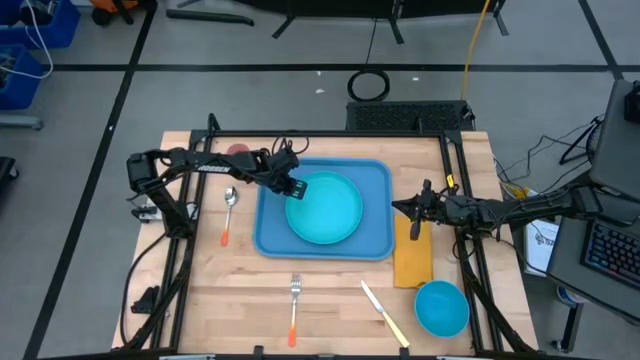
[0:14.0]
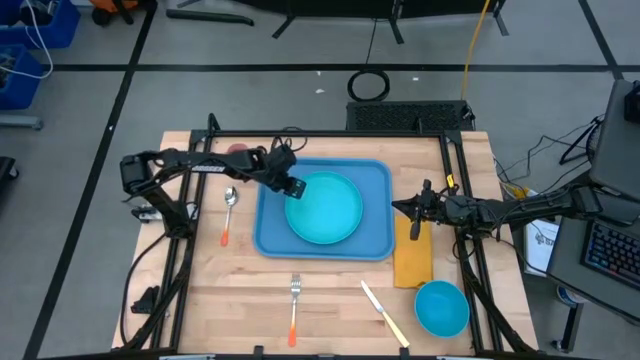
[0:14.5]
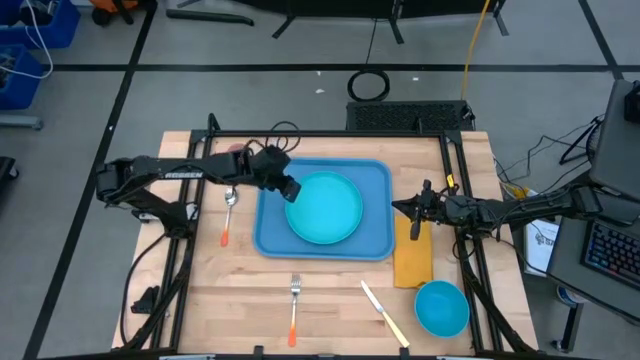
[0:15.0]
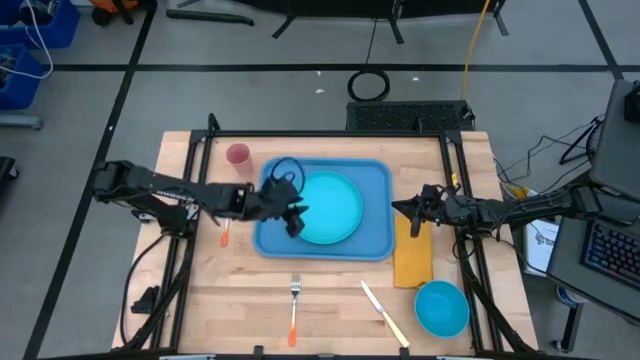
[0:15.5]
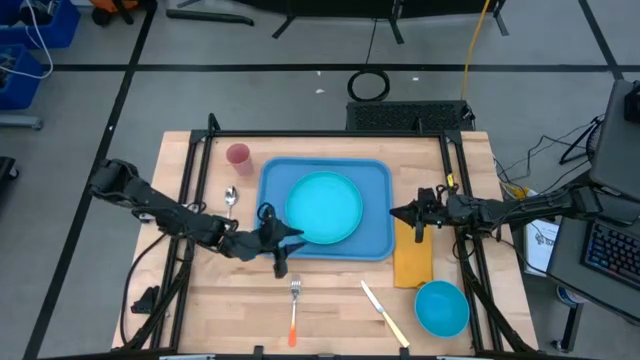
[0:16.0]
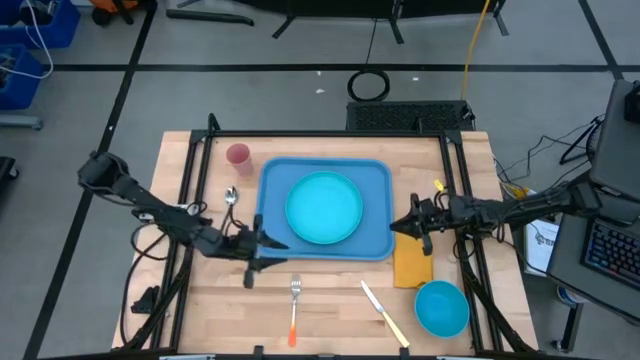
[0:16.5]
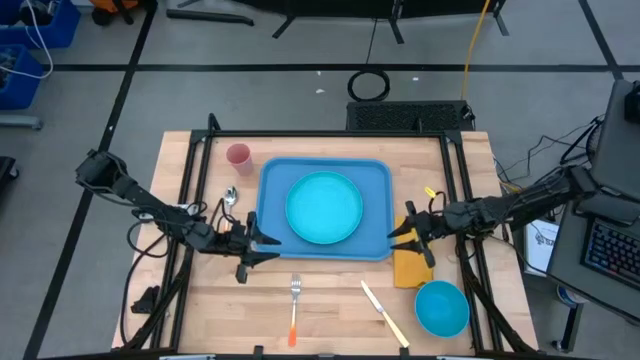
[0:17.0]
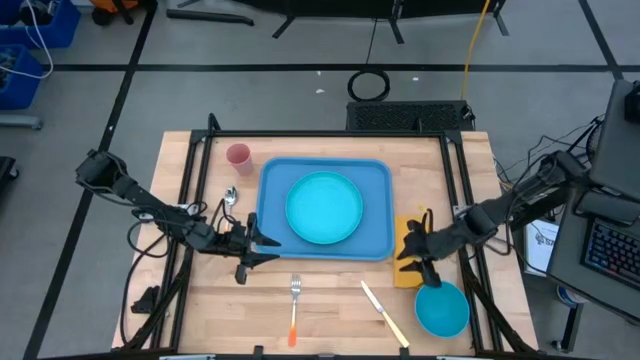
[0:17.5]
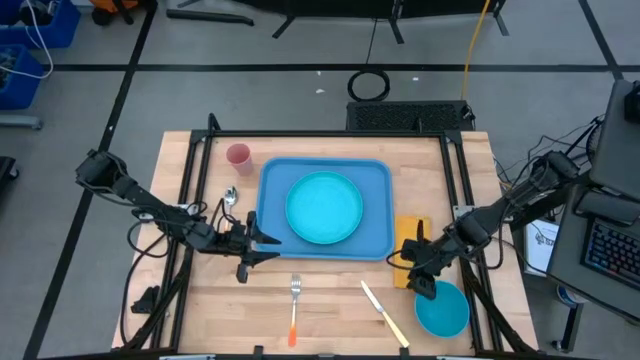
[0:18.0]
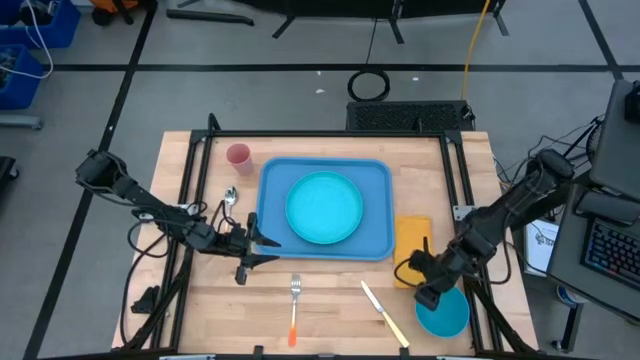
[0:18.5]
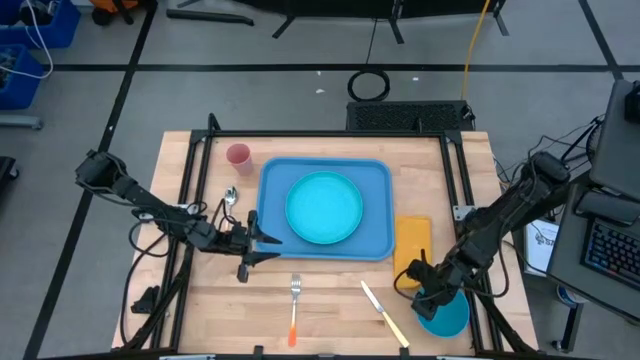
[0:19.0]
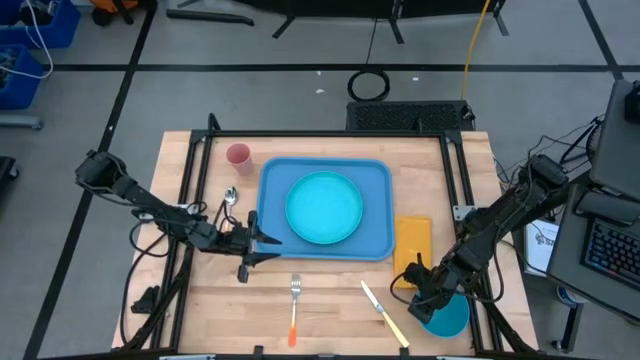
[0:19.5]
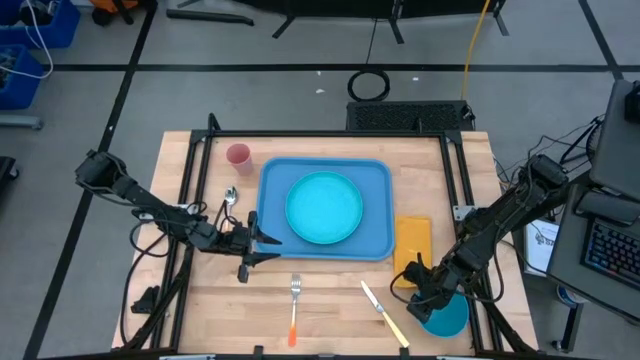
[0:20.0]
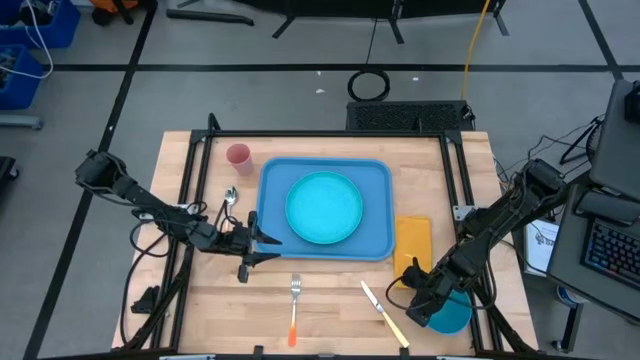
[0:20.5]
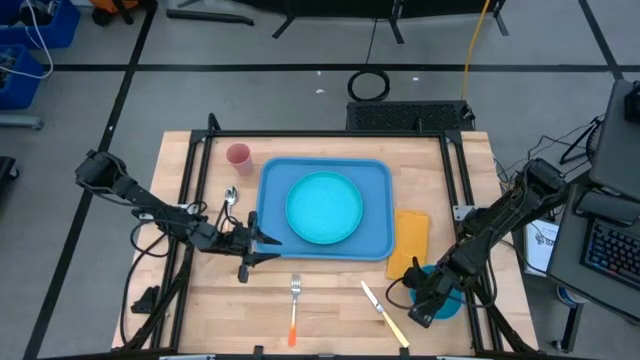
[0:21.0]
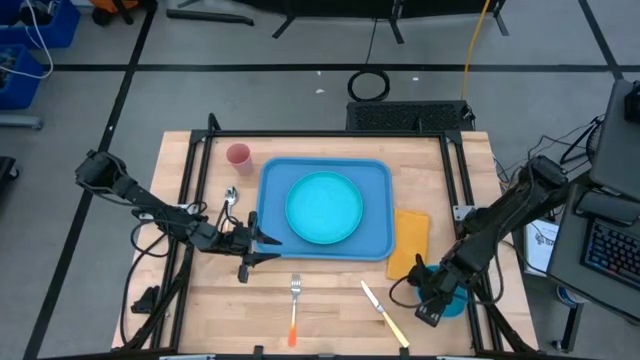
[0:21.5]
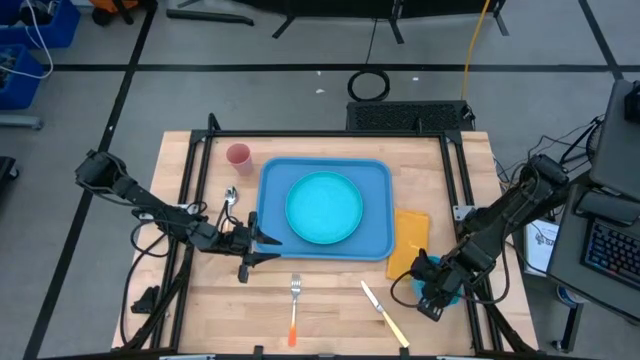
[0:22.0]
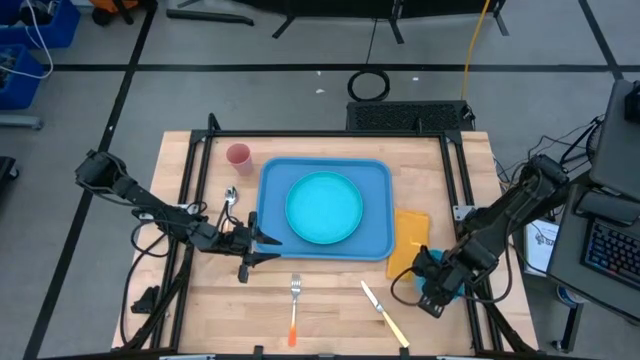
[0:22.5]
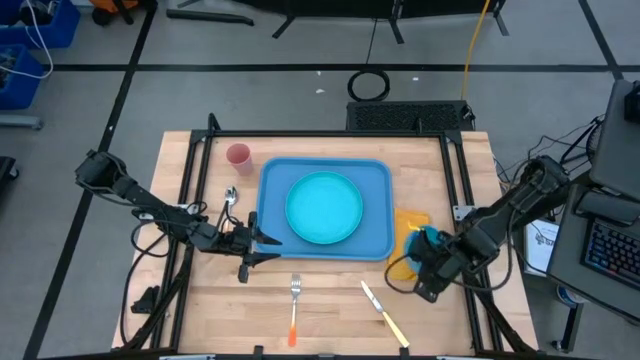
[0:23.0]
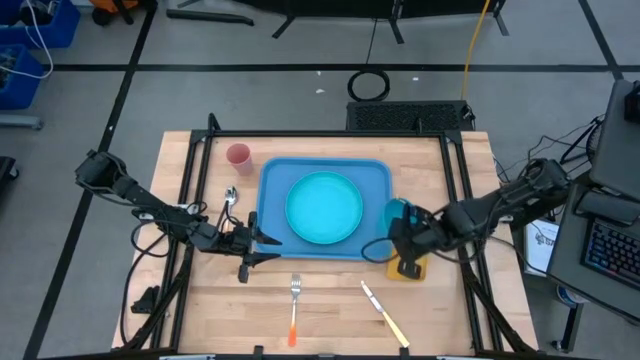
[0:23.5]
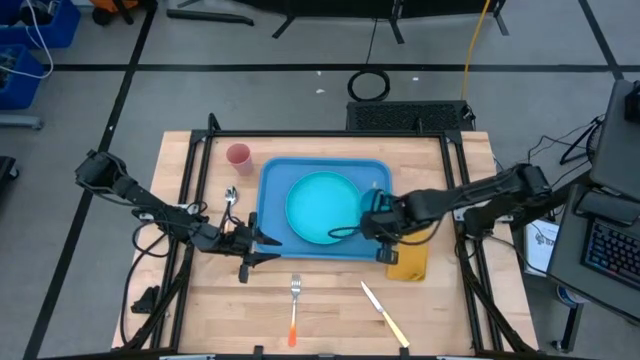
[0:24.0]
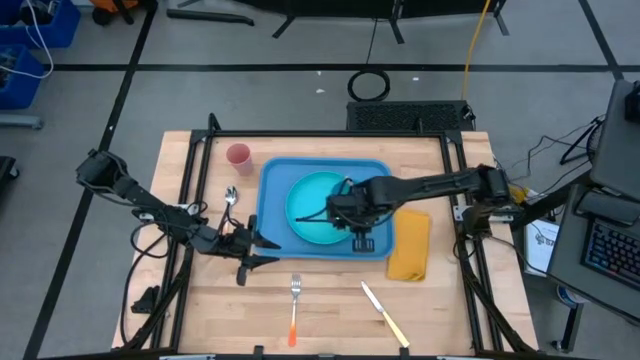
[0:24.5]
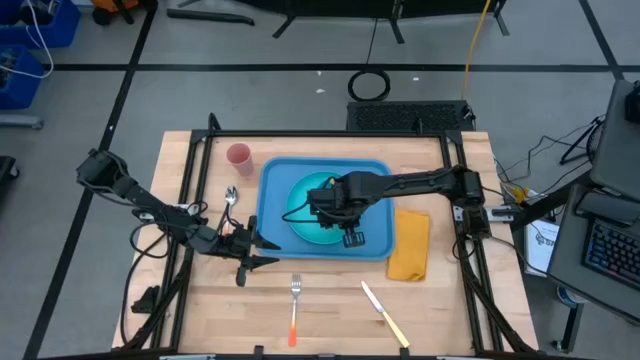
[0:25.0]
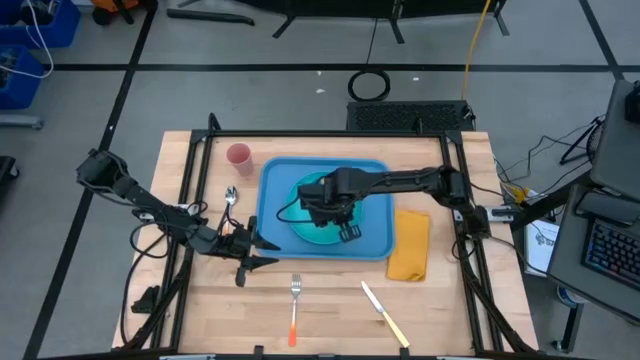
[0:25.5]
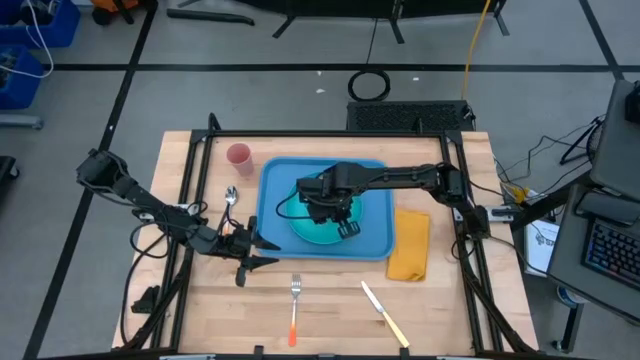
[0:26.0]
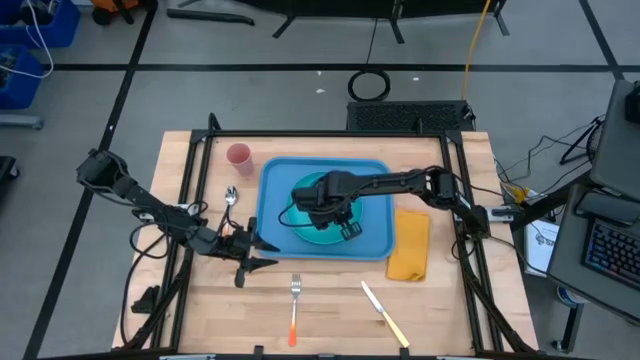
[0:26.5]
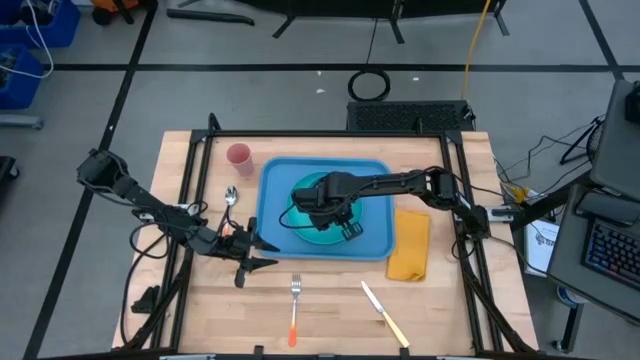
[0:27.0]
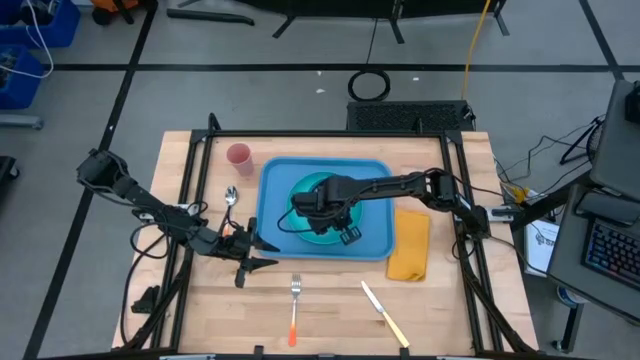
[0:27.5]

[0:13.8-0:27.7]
Task: Set up tray
Put the blue bowl on top of the plate on the blue serving tray

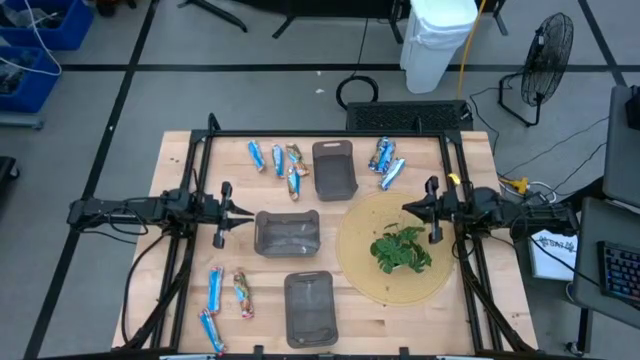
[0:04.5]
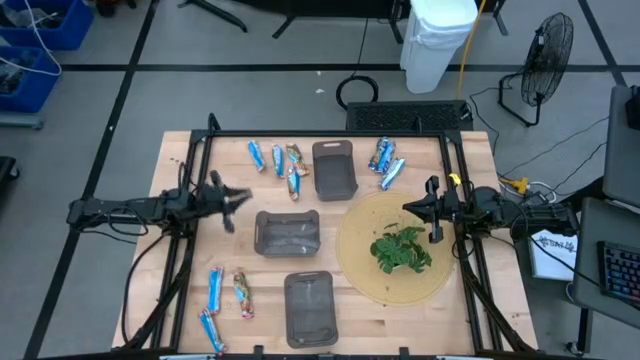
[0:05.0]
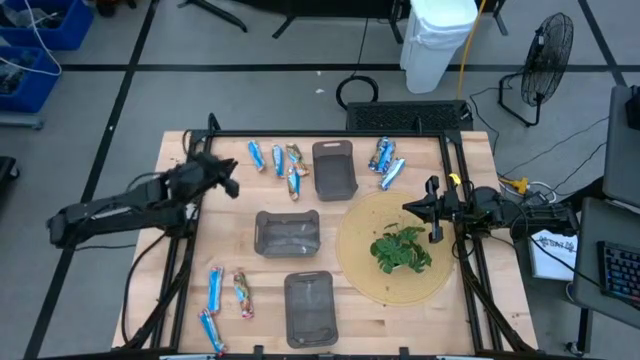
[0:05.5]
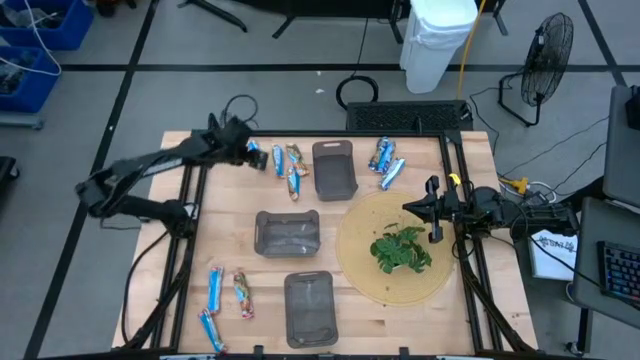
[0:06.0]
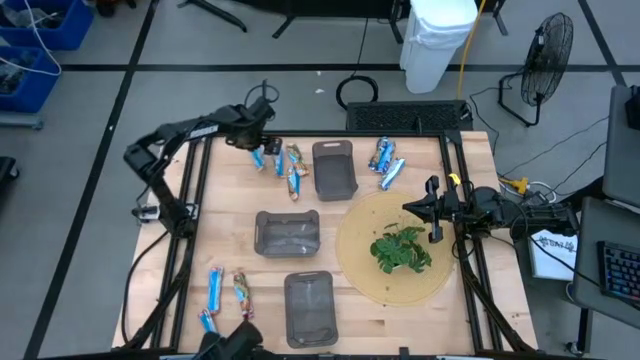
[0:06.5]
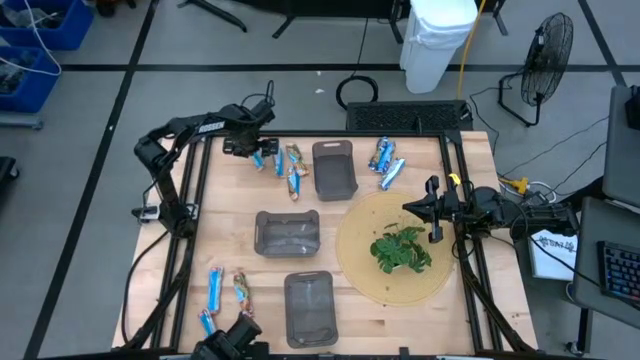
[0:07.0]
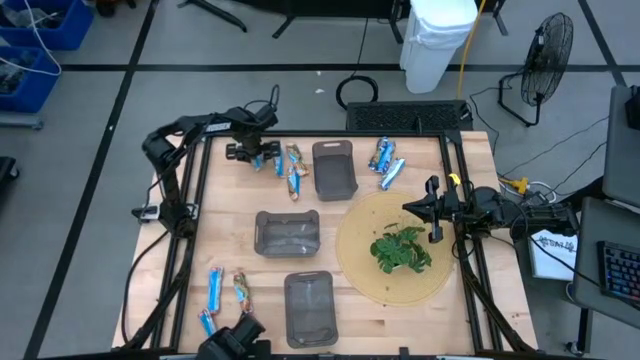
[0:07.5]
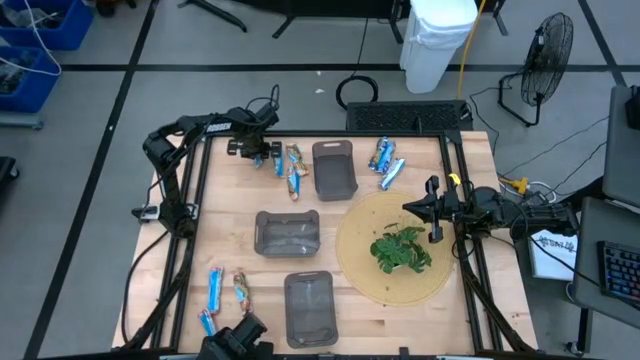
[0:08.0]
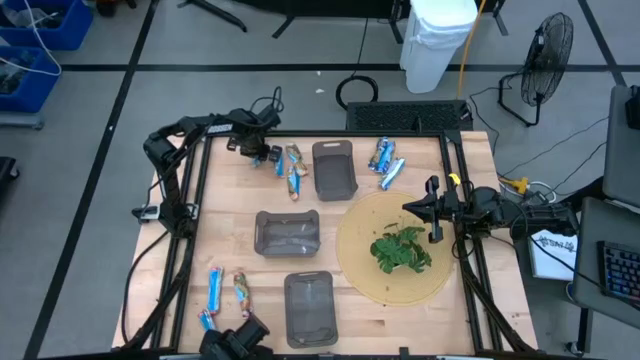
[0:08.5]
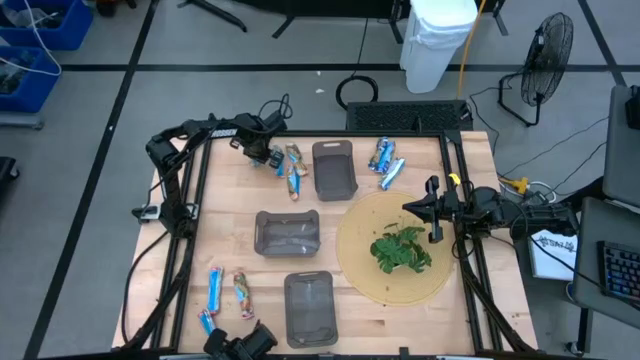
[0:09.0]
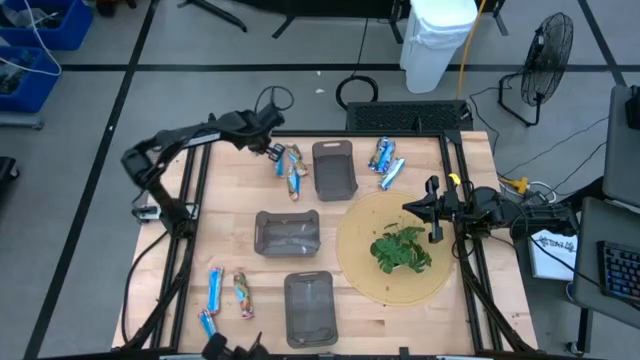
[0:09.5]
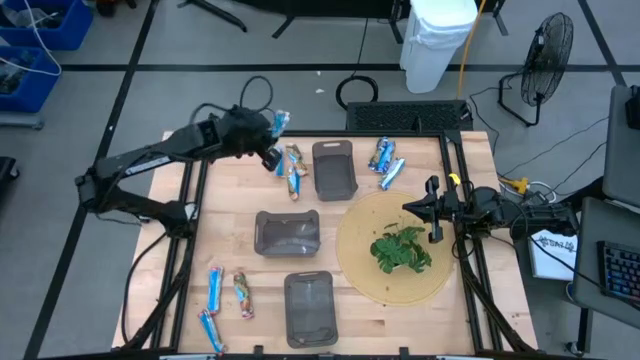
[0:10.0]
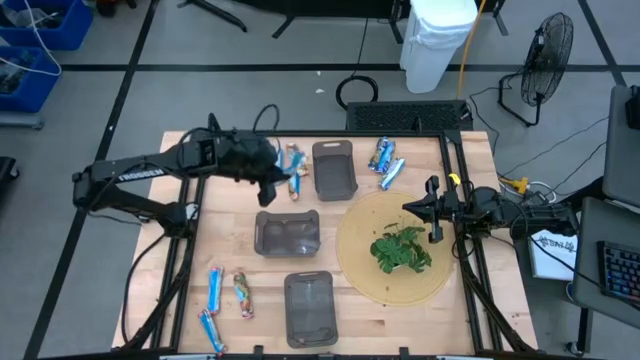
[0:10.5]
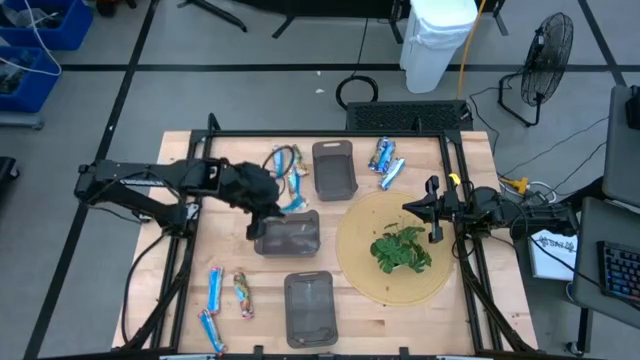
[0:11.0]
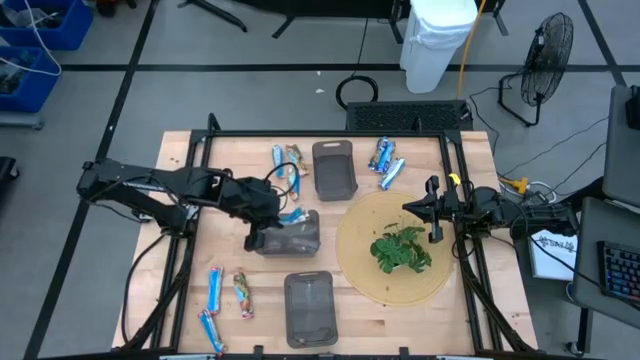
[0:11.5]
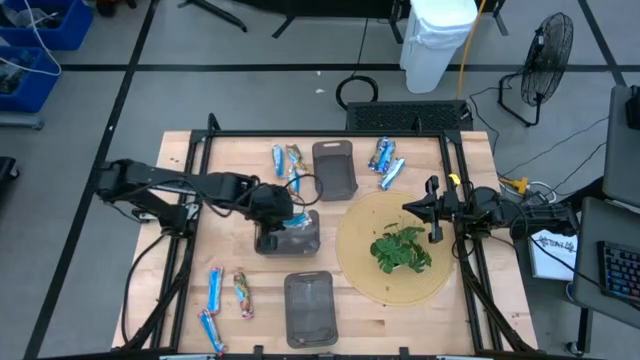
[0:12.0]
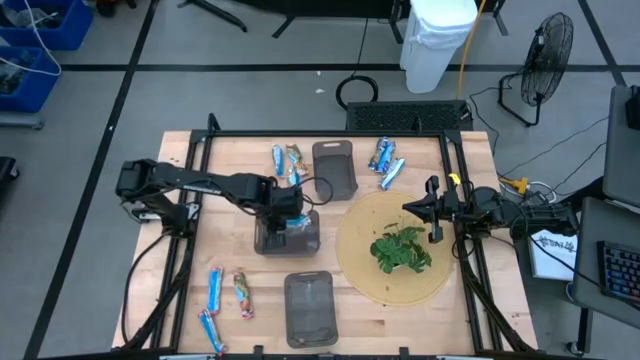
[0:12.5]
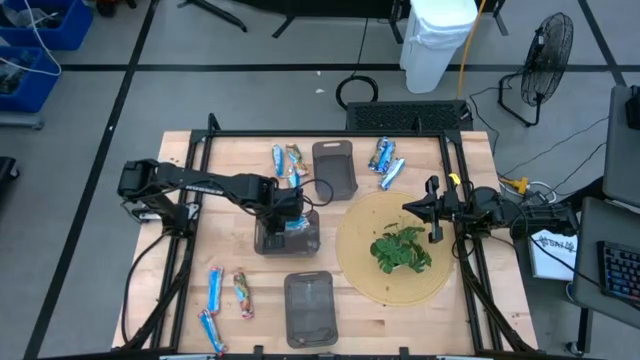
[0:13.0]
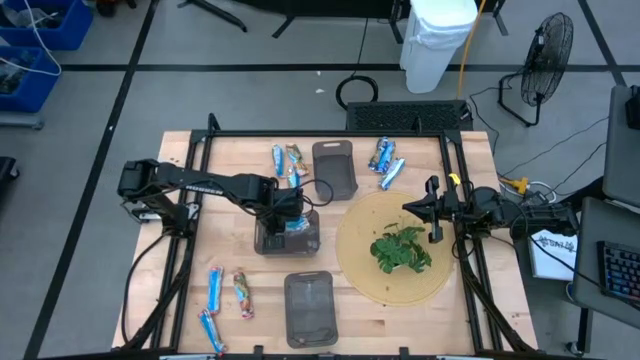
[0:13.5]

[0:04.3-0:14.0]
Task: Pick and place Granola Bars by type
Put the yellow granola bar into the middle black bin
